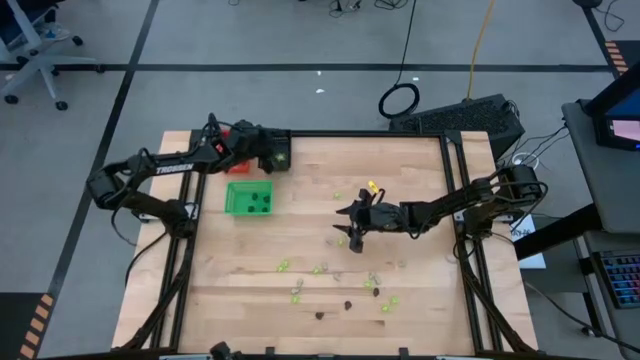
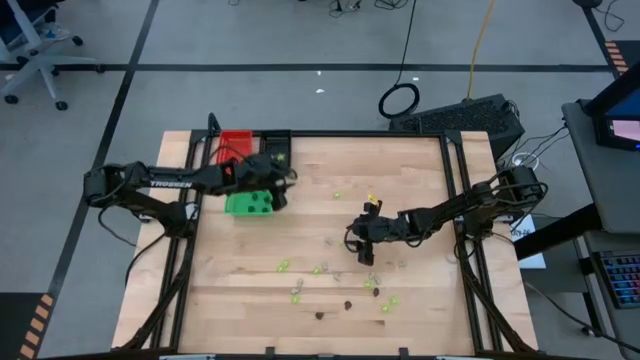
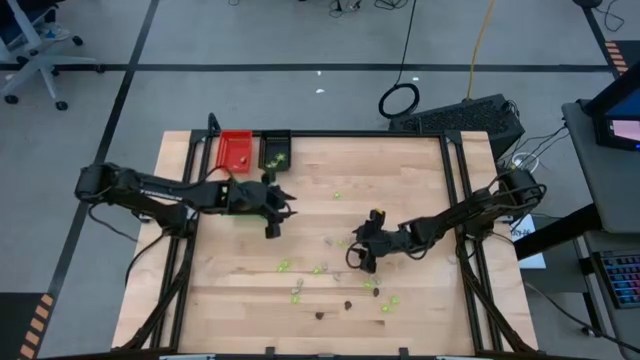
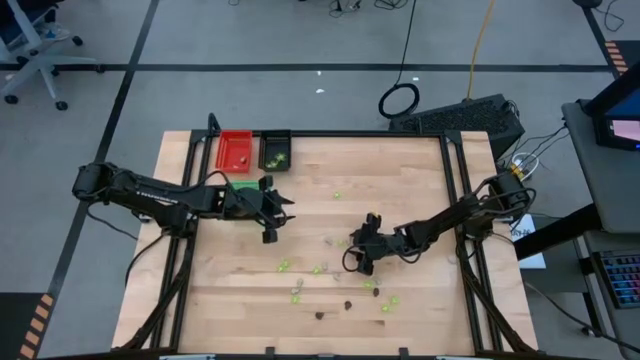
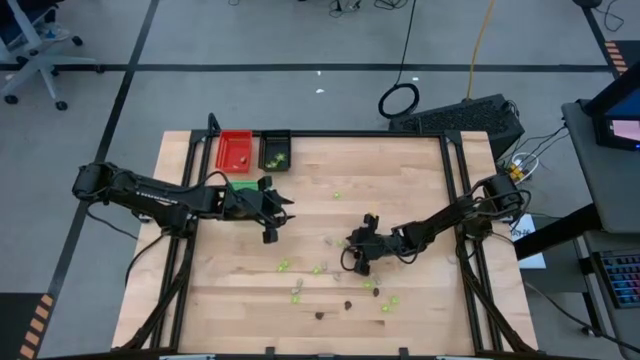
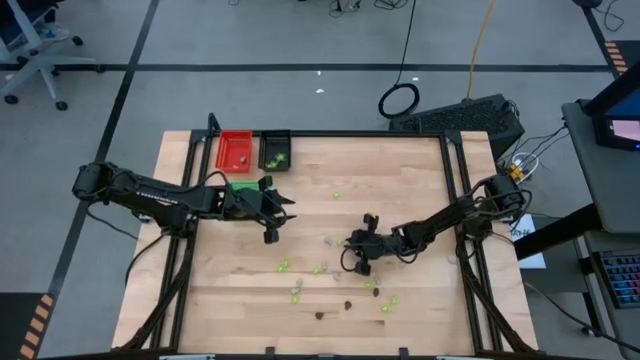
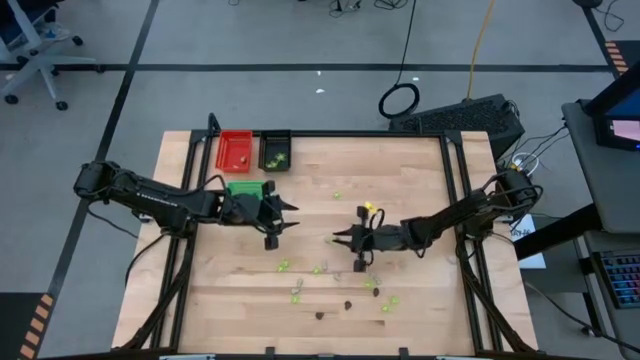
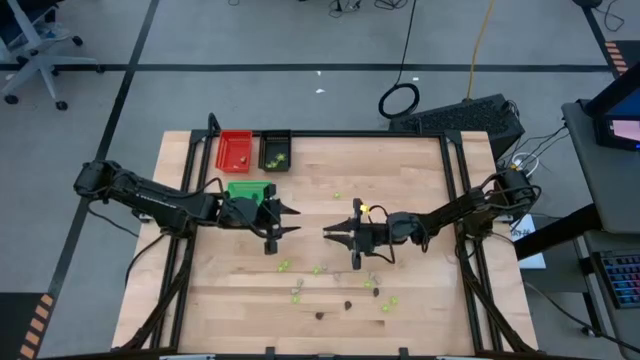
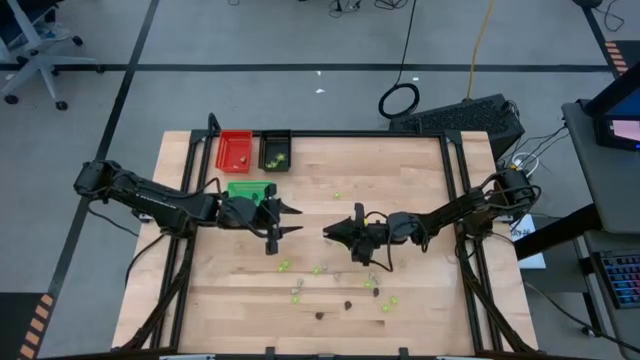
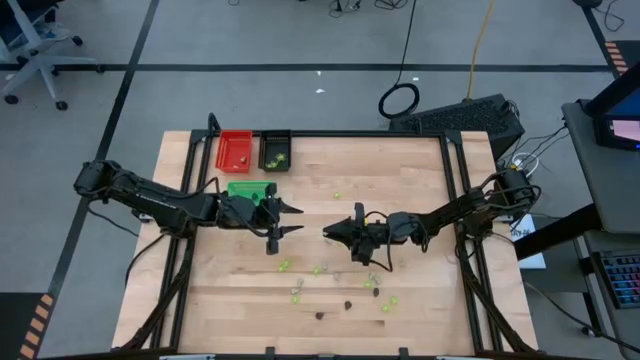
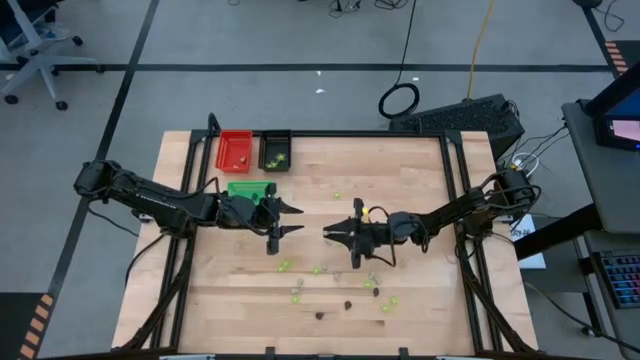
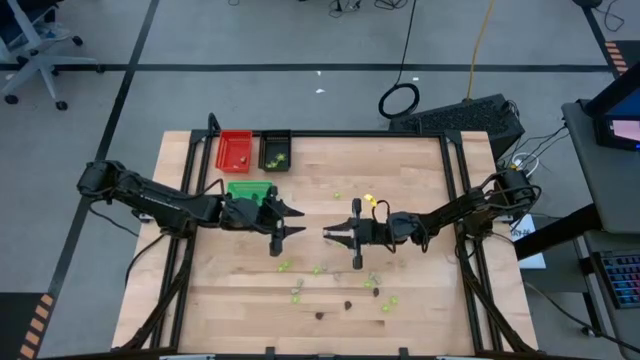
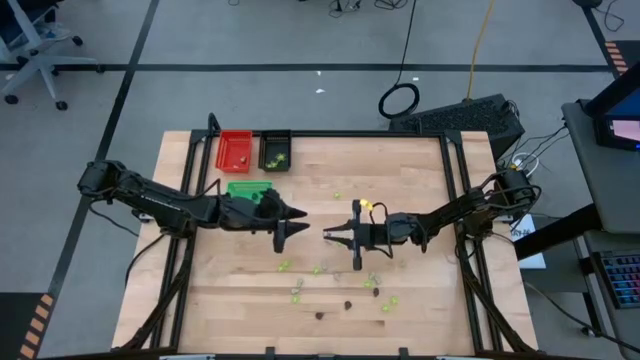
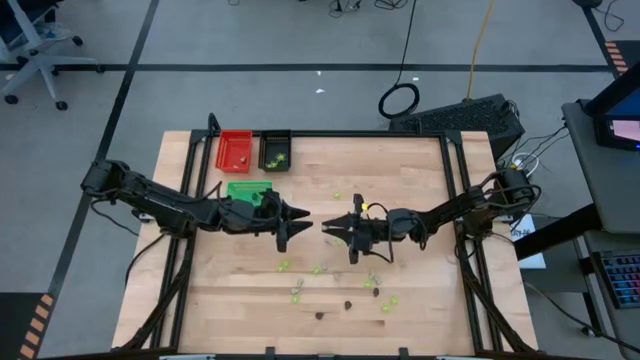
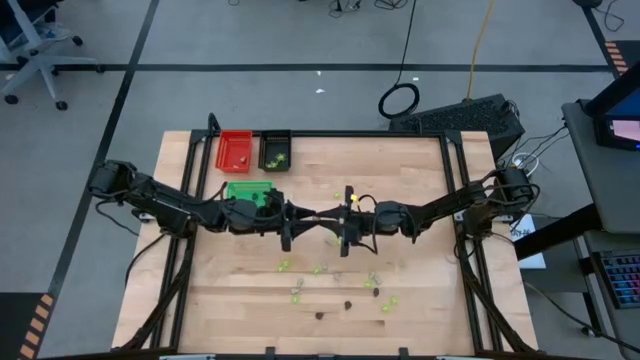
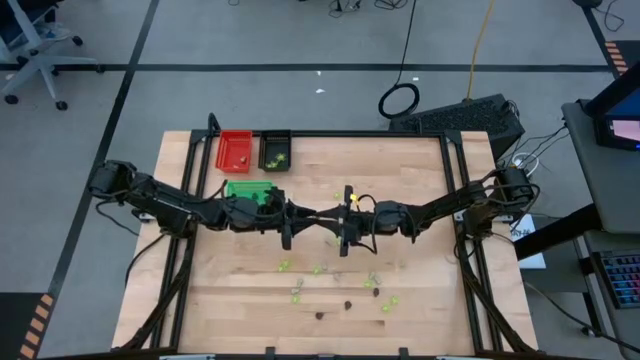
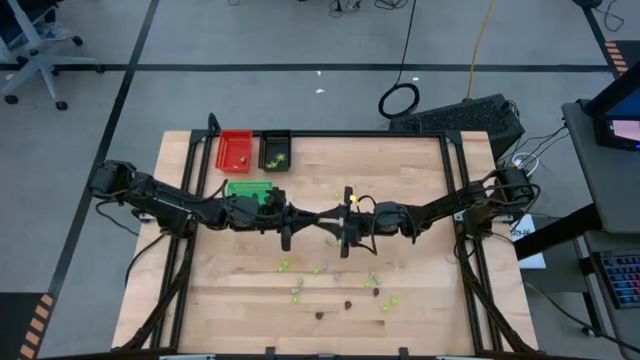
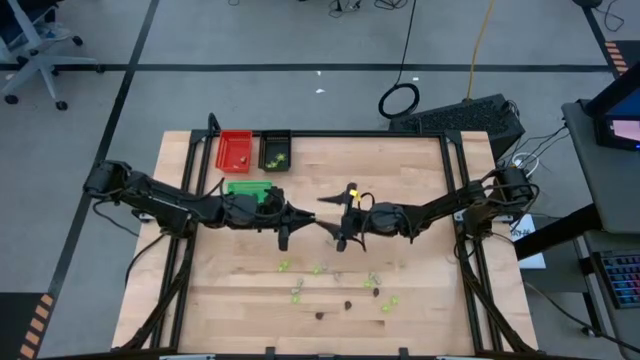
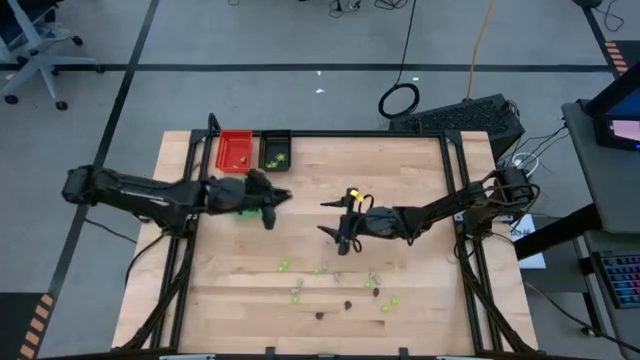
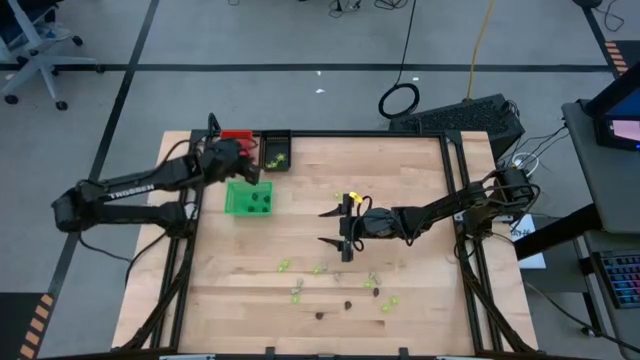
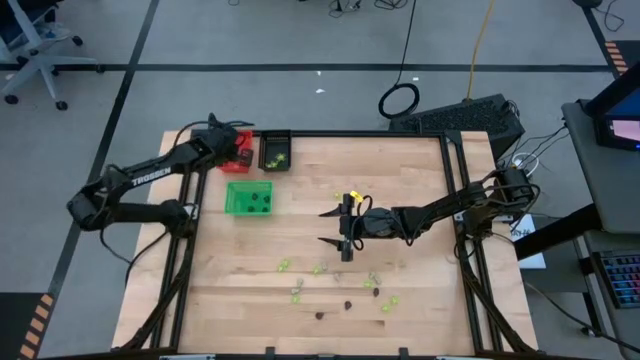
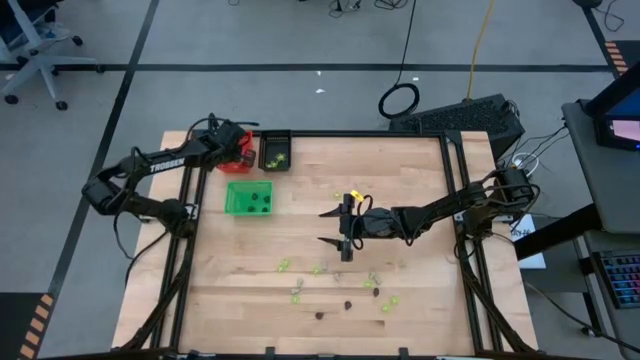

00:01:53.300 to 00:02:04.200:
Task: Sort Halloween decoration
Put the white skull toy into the red bin

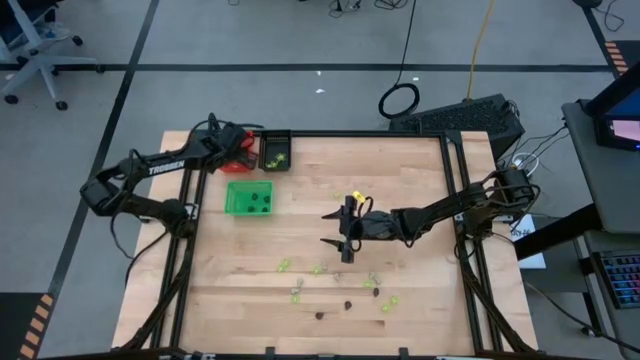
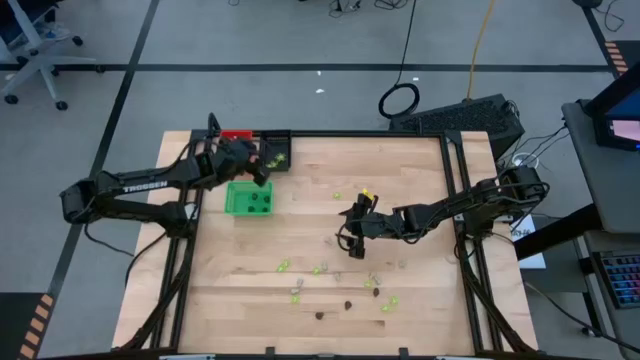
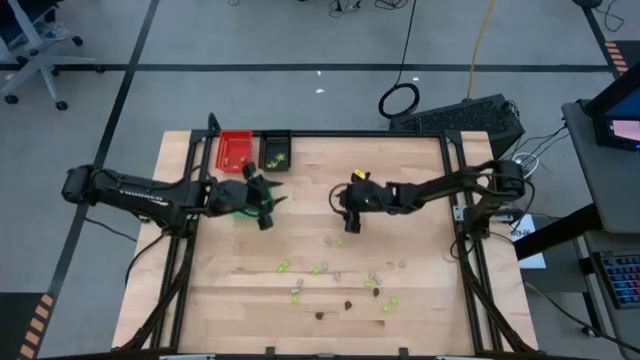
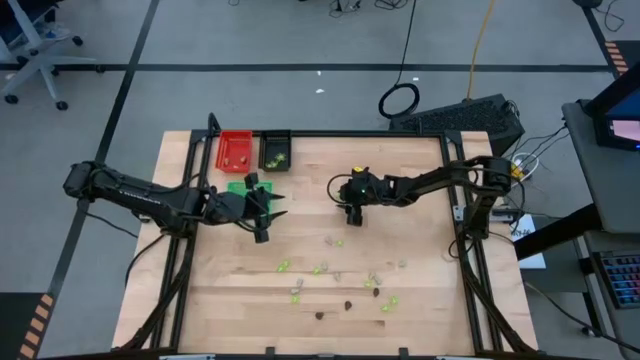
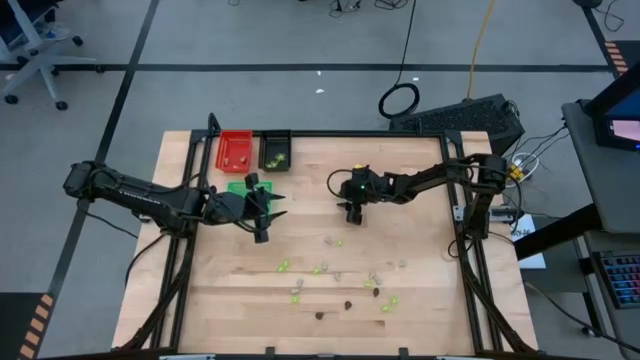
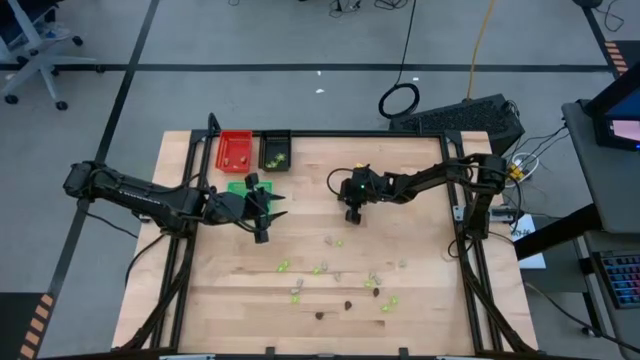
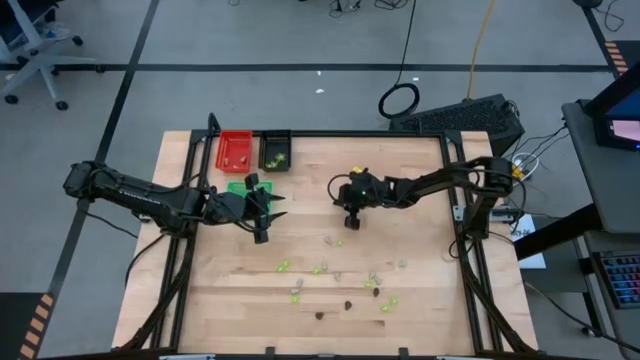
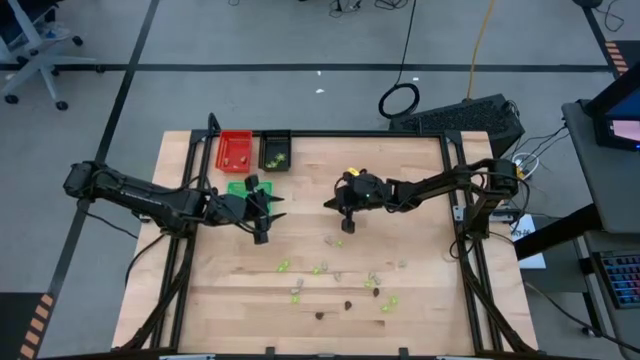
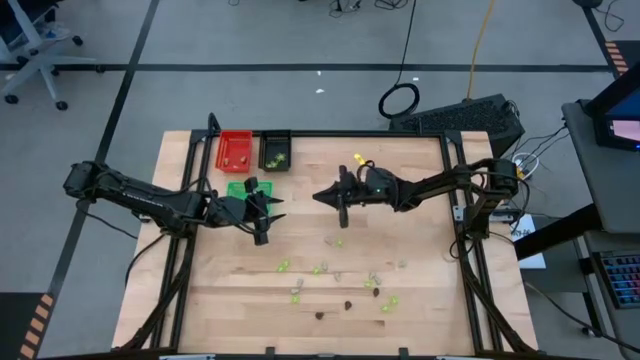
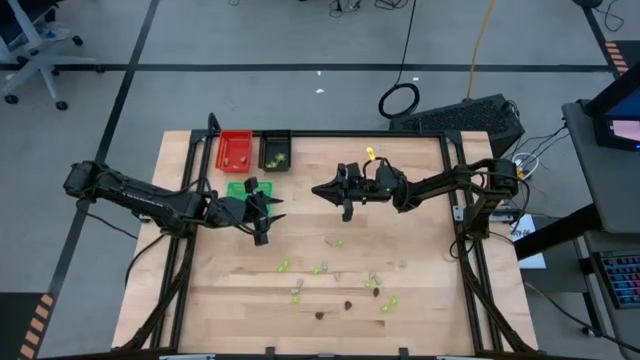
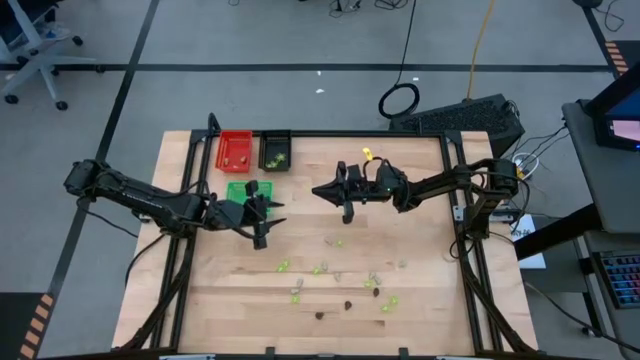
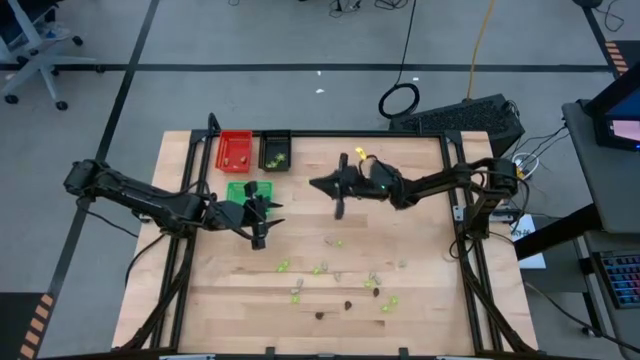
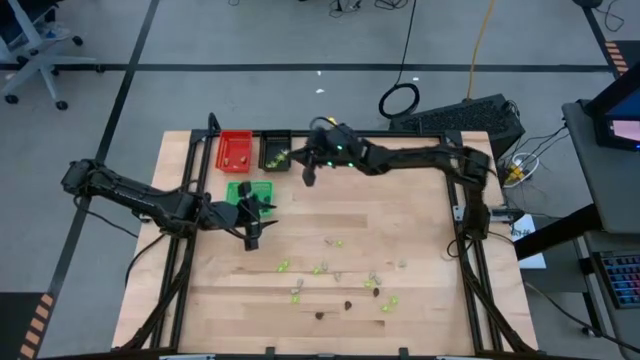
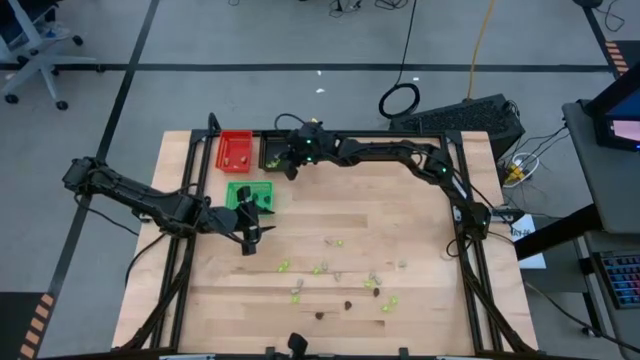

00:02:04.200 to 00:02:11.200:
Put the green spider toy into the black bin

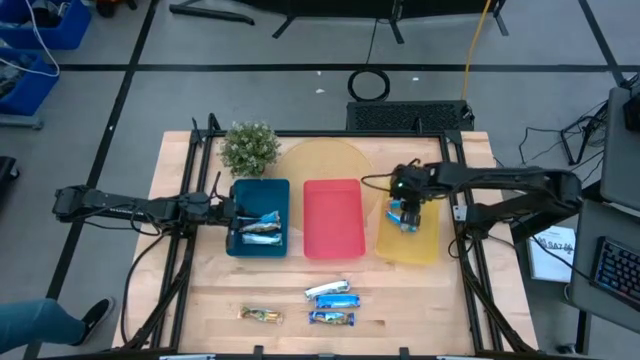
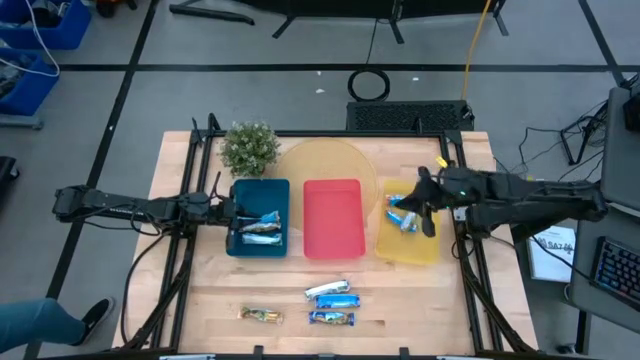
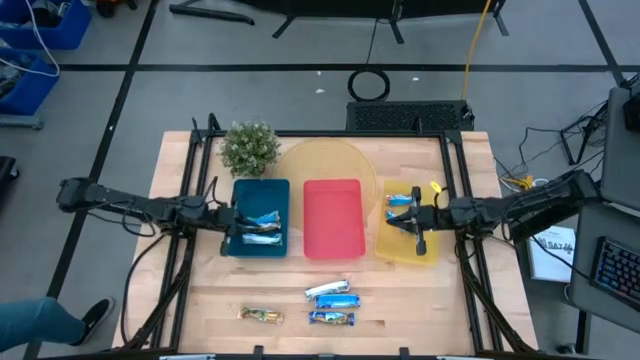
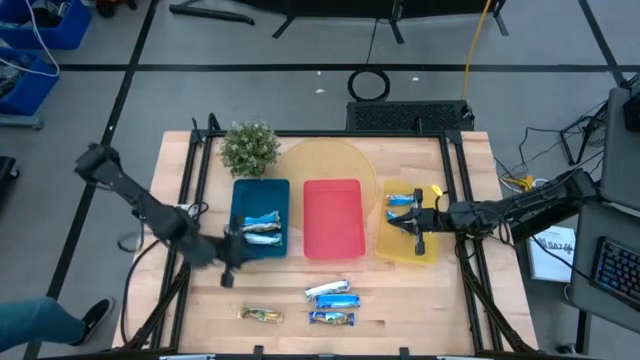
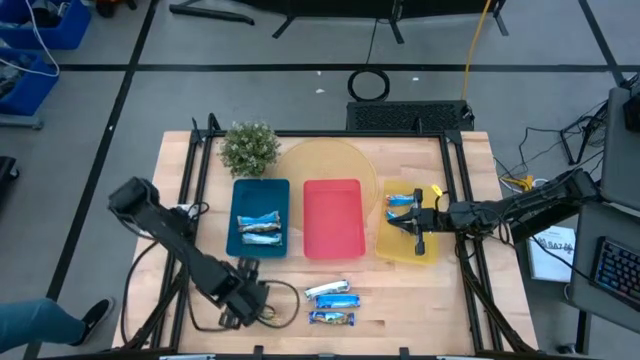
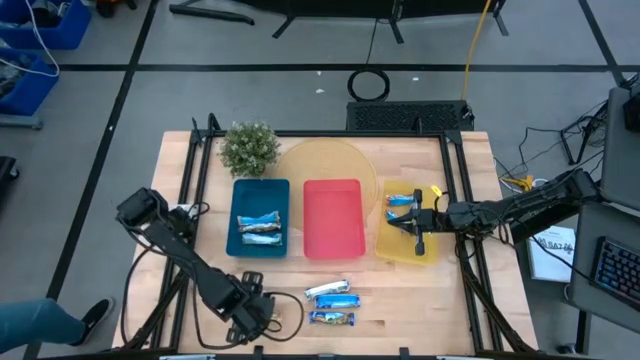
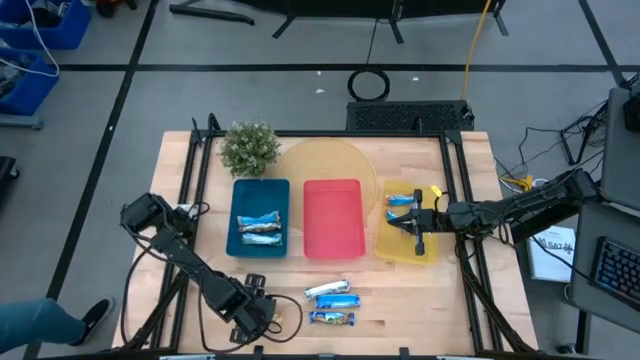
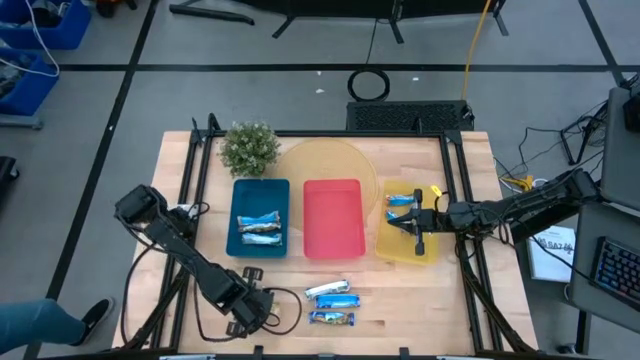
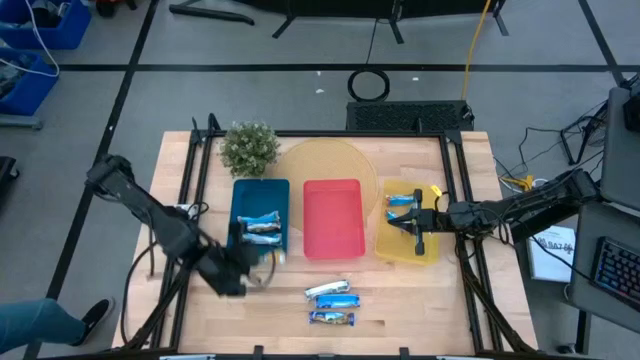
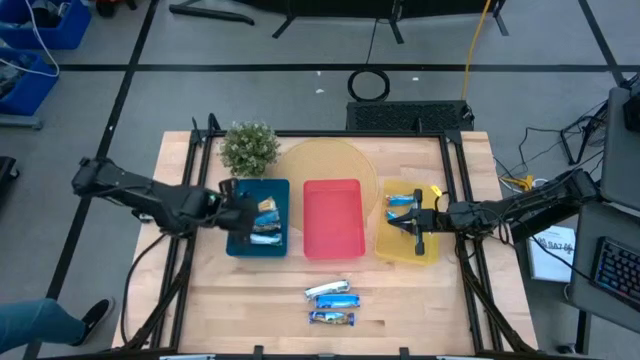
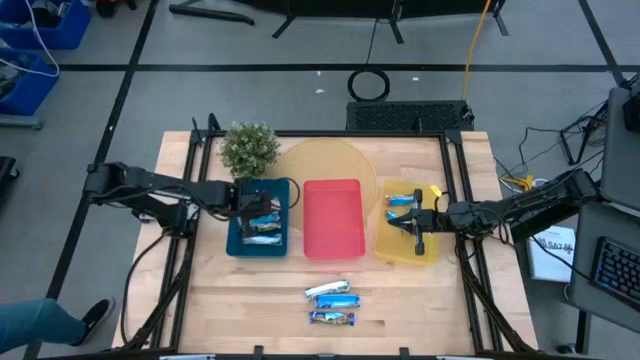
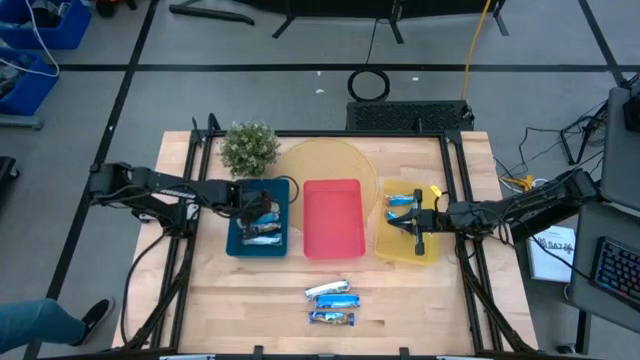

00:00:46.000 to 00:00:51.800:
Task: Pick and place Granola Bars by type
Put the yellow granola bar into the blue bin
